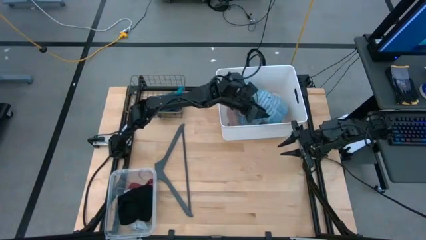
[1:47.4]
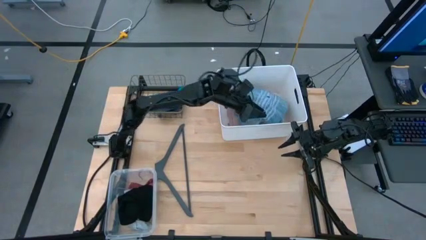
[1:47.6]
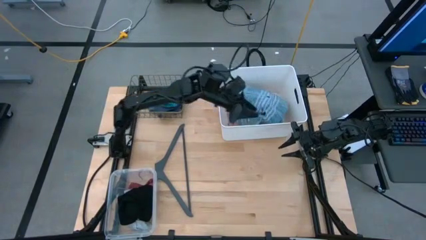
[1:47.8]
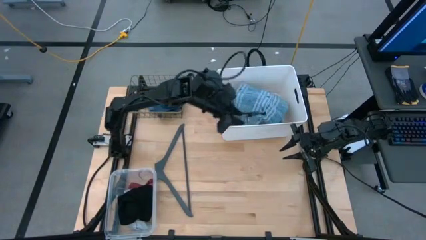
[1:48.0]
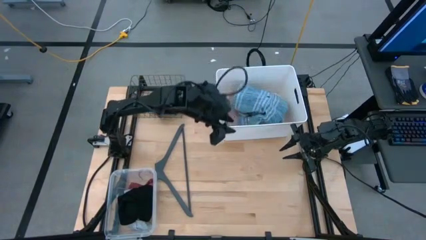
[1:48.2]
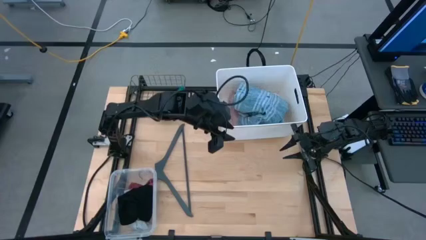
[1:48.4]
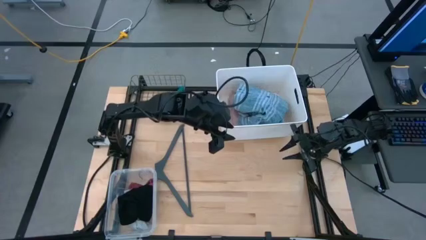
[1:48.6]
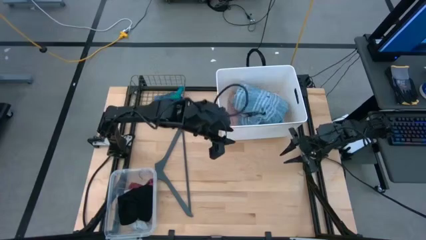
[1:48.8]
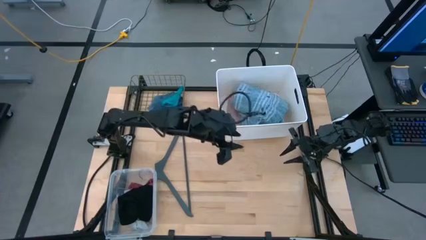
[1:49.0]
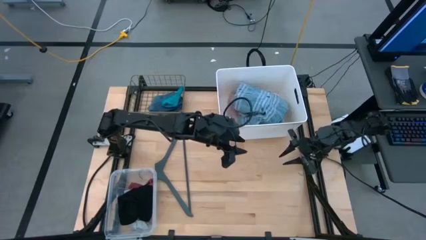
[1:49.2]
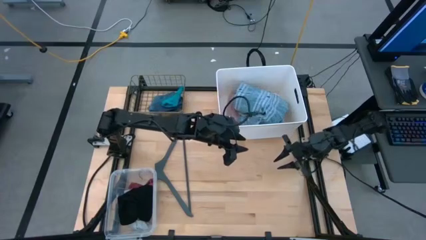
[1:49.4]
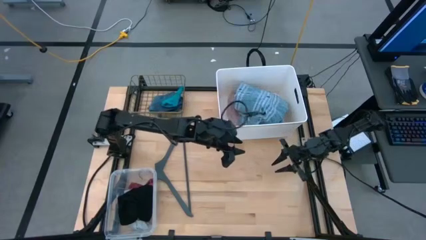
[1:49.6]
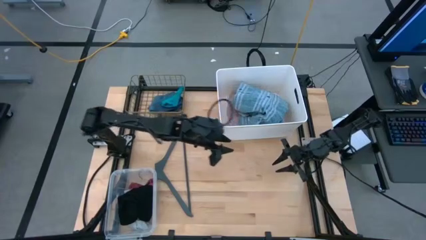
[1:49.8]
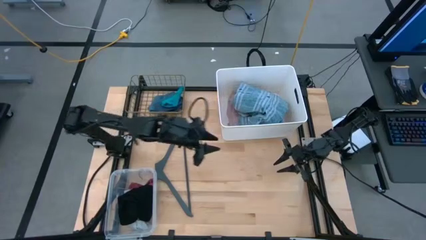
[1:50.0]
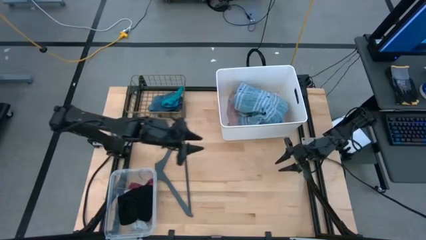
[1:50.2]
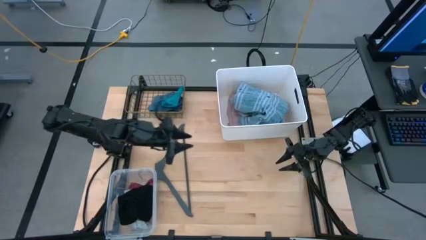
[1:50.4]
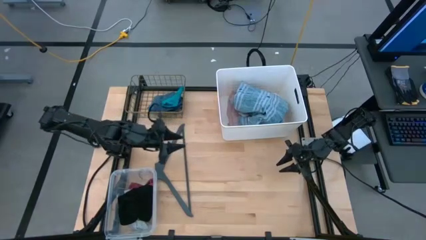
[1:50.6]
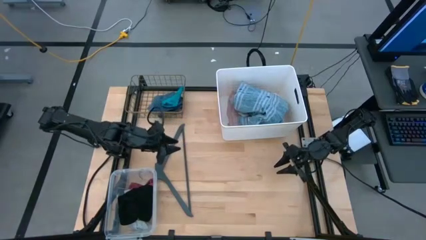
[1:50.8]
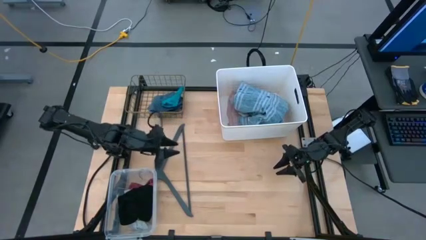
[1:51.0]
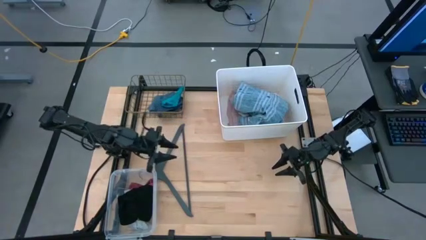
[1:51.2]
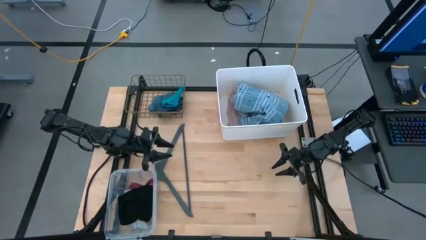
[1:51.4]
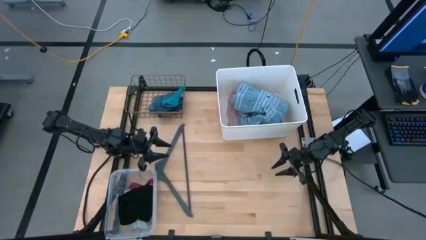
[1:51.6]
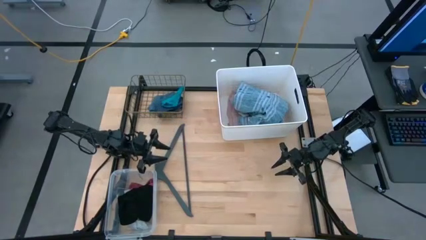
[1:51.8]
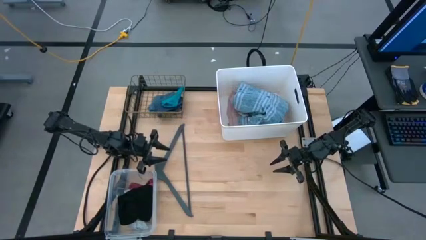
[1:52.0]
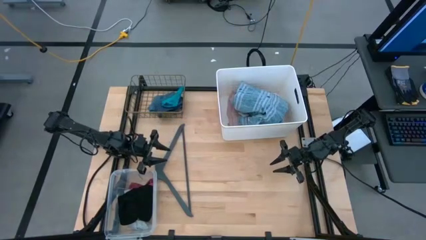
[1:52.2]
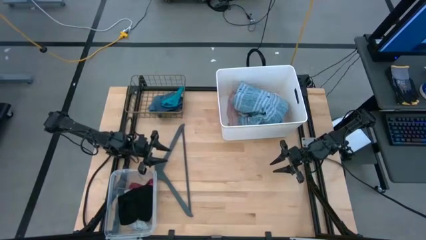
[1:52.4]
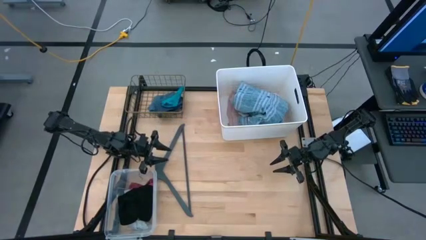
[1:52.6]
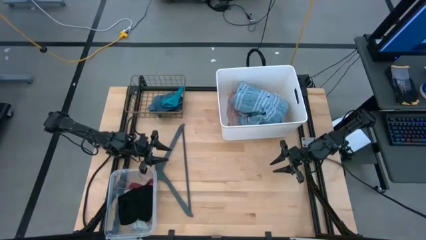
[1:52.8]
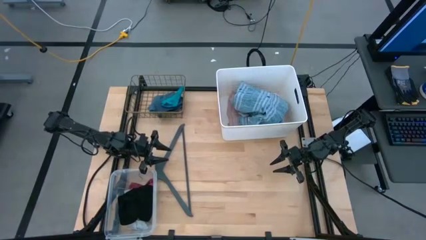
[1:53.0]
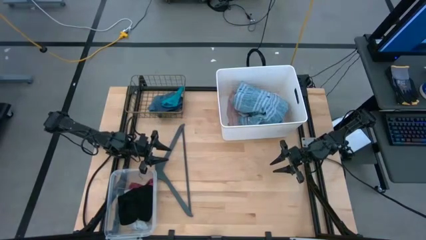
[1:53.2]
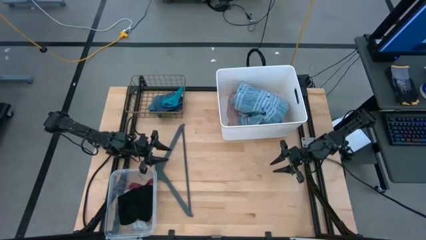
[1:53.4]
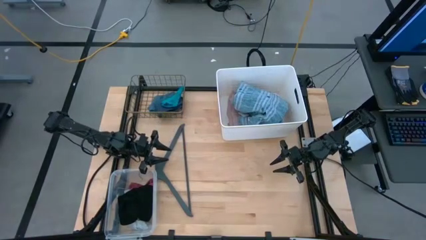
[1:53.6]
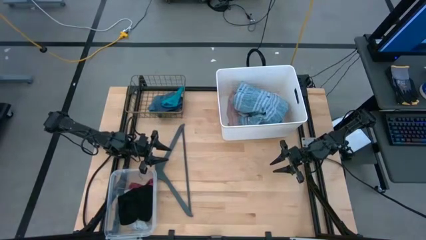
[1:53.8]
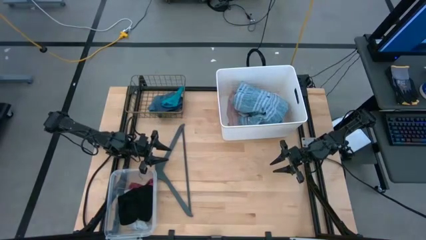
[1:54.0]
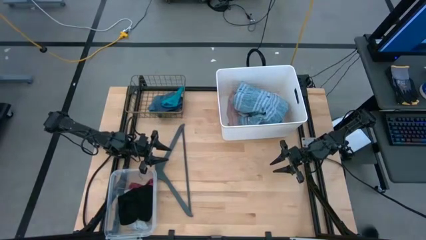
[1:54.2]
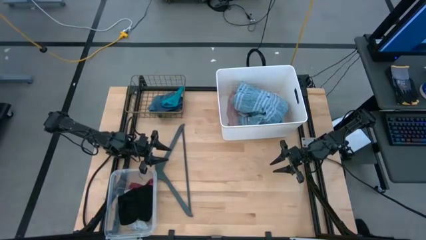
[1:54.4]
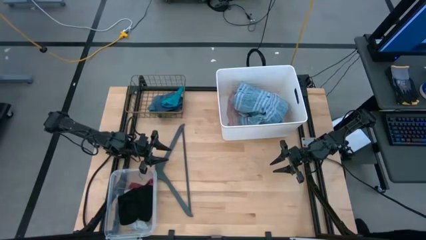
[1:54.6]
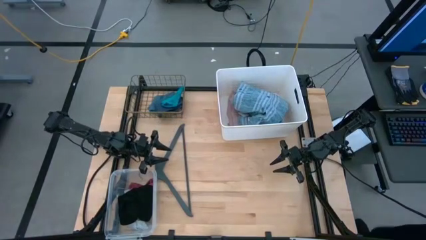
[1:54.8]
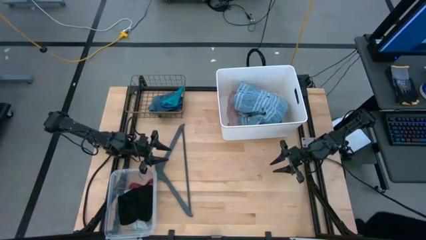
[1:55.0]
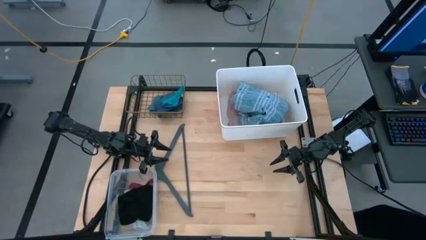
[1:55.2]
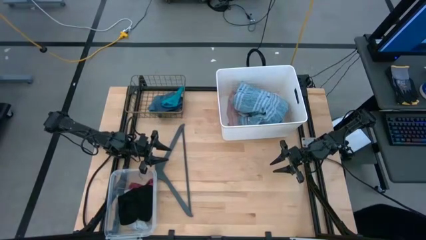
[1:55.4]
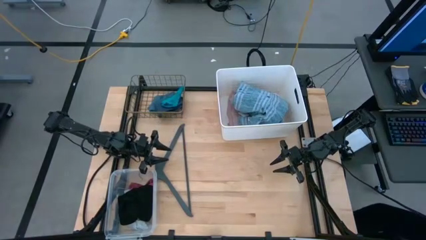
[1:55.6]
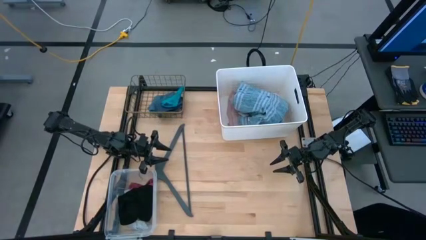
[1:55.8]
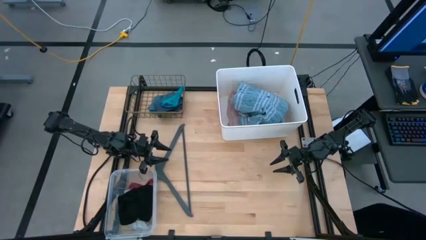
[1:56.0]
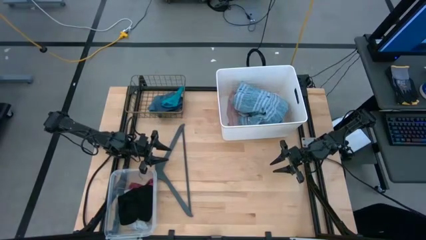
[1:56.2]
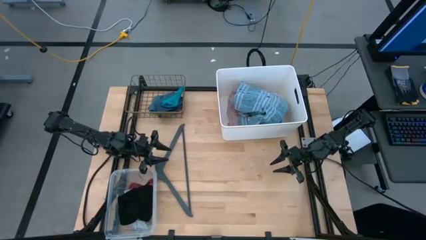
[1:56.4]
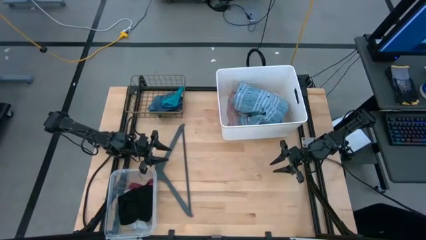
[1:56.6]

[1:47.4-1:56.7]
Task: Pick & Place Cloths
Return to Home Position

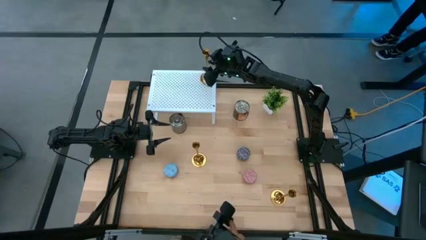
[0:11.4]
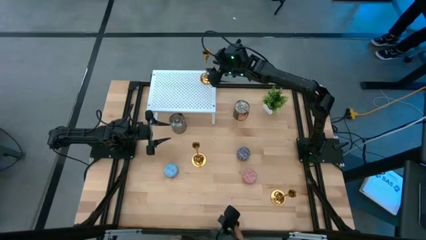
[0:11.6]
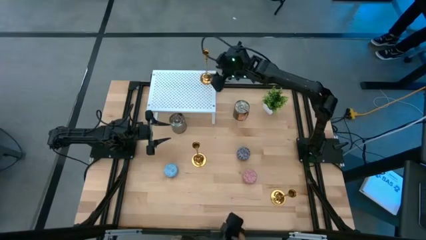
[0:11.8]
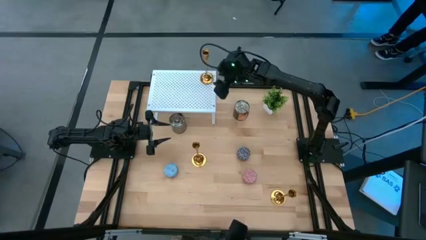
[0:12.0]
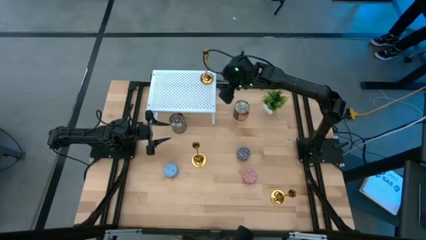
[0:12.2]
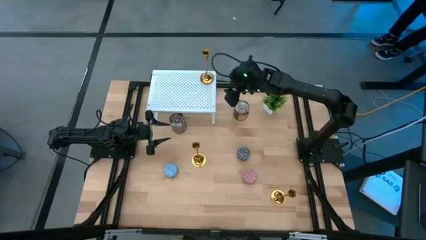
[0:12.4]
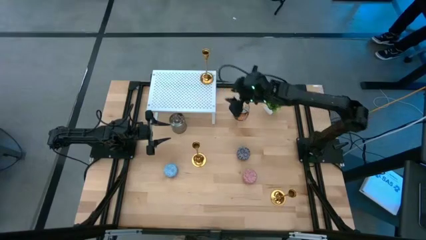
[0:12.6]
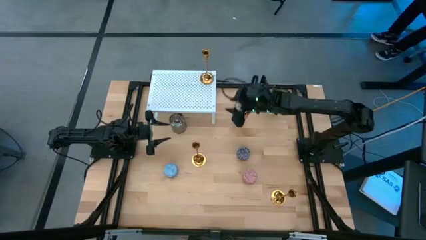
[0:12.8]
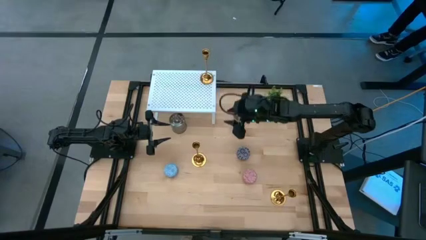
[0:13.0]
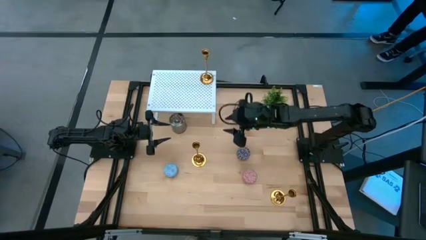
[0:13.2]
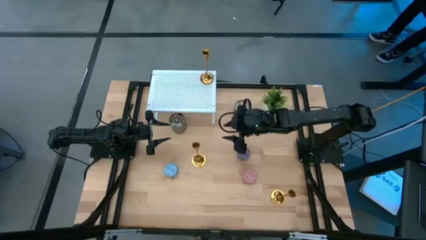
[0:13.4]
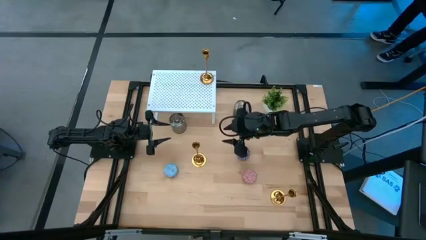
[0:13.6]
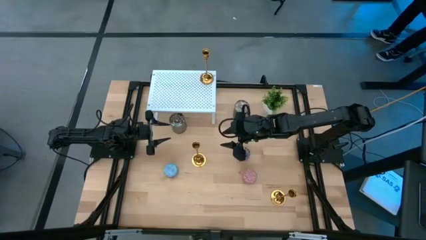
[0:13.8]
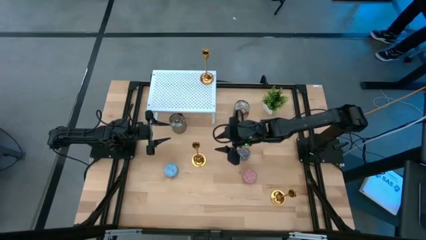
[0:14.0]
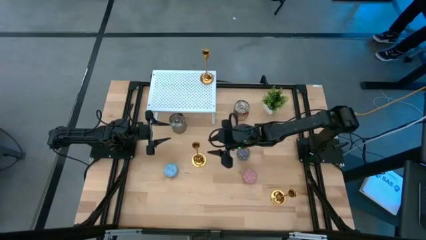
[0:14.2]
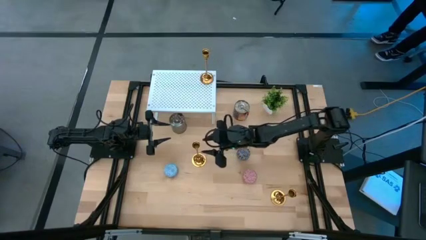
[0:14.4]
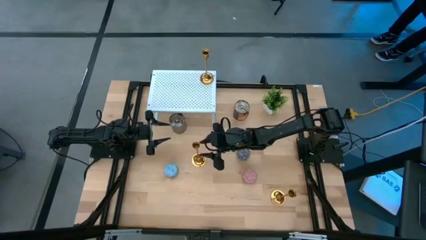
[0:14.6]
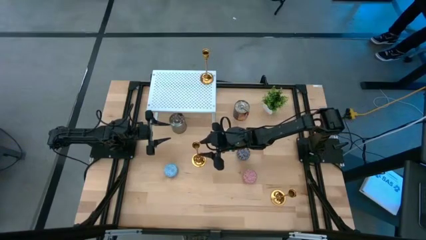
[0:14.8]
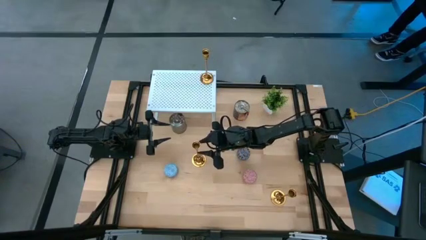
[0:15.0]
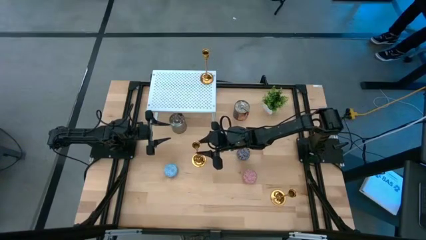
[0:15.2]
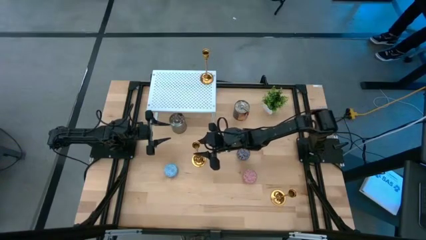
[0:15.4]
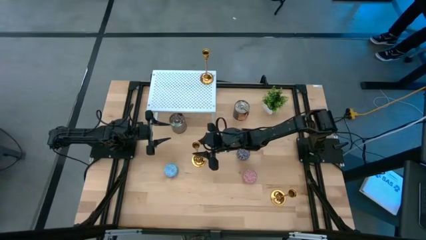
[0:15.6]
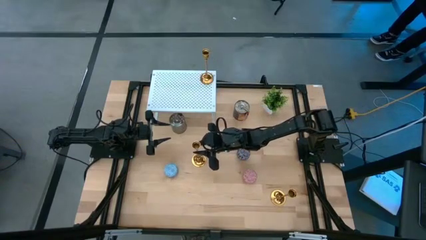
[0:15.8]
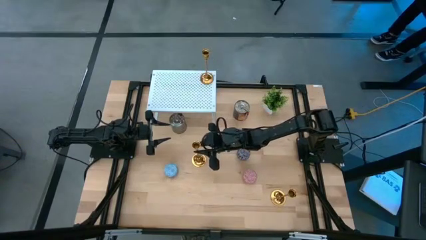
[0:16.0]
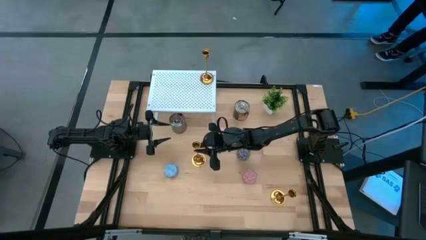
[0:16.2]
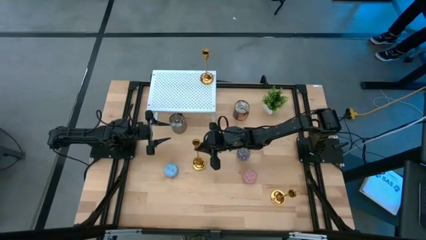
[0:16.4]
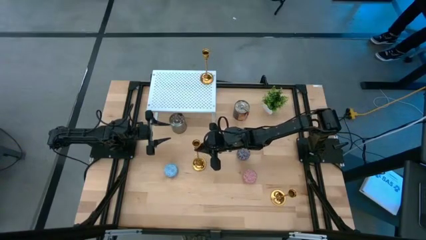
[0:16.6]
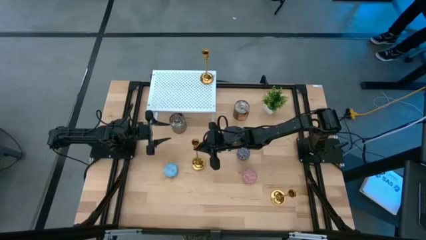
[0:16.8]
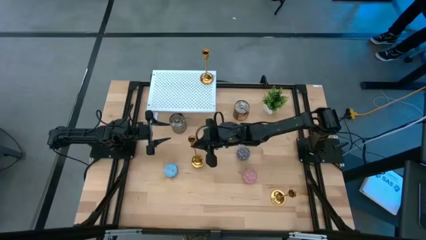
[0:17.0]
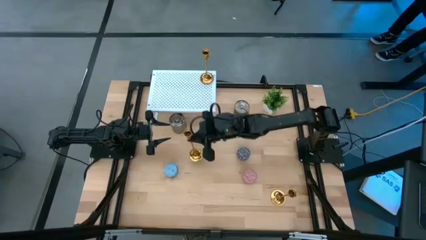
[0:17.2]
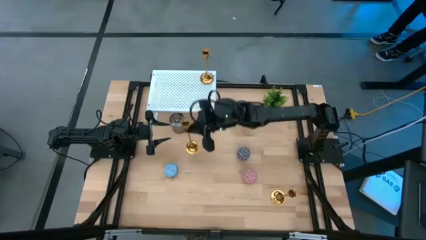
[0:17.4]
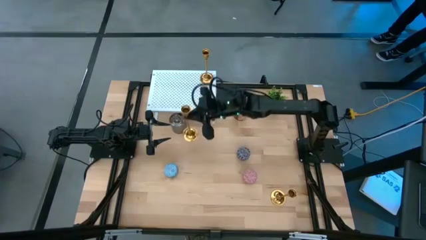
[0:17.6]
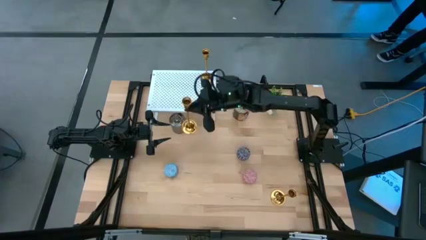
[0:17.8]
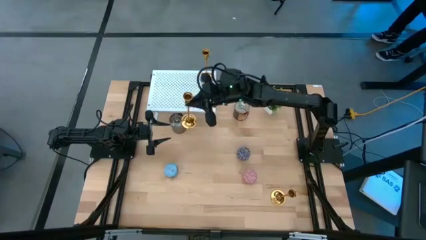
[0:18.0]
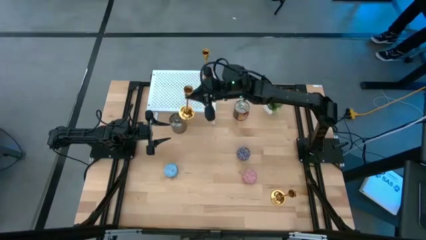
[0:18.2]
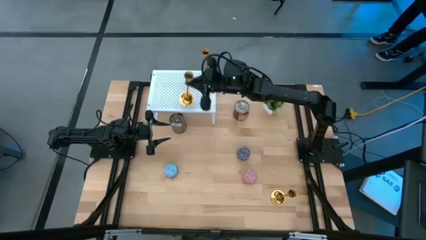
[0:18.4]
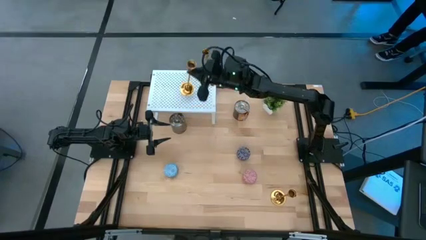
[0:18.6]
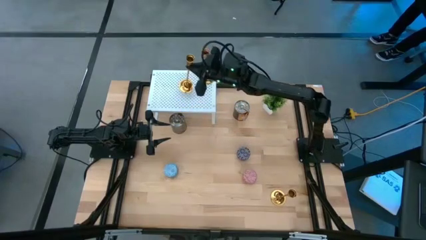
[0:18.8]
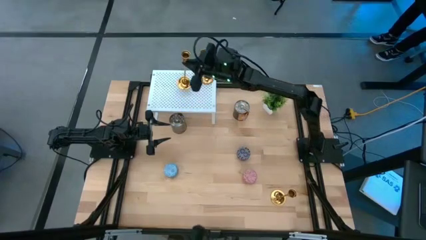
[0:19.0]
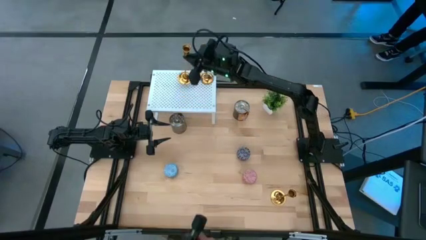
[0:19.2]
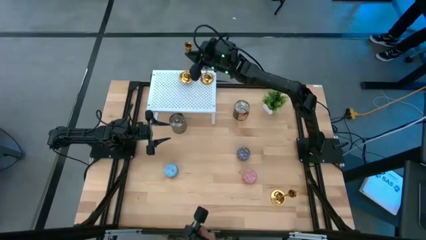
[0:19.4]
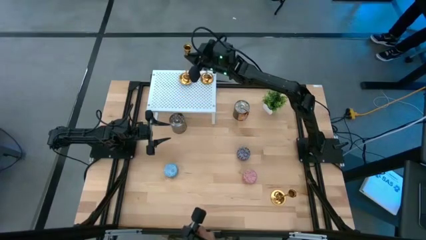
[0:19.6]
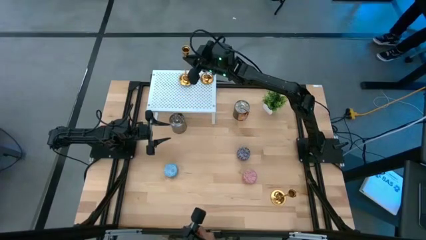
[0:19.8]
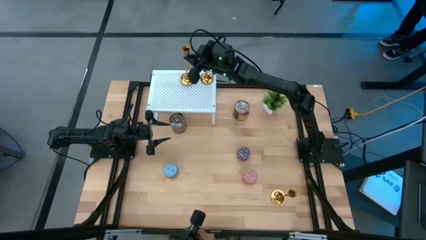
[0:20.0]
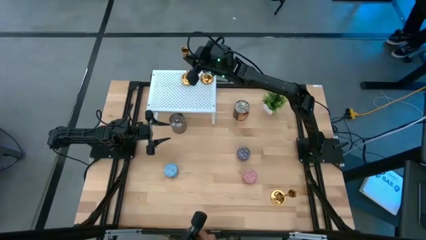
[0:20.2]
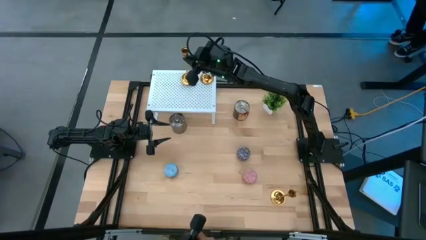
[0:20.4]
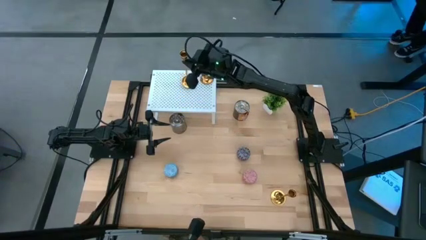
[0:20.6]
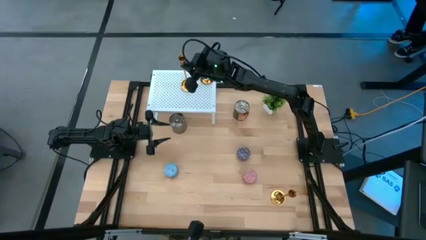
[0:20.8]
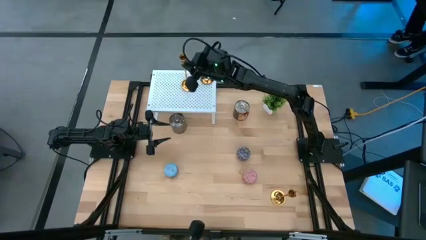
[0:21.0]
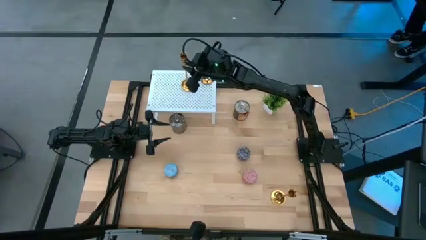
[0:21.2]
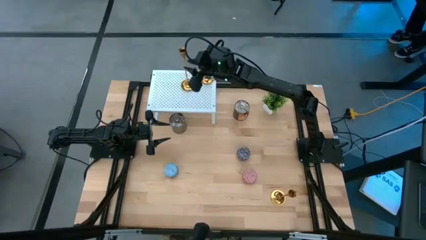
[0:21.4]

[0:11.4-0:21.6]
Task: Pick & Place candle stick holders
Put the center gold candle holder on the shelf
